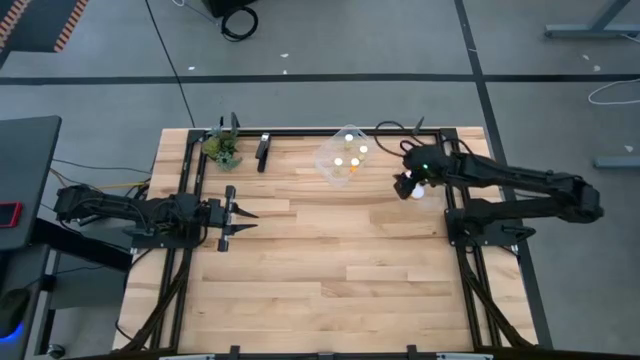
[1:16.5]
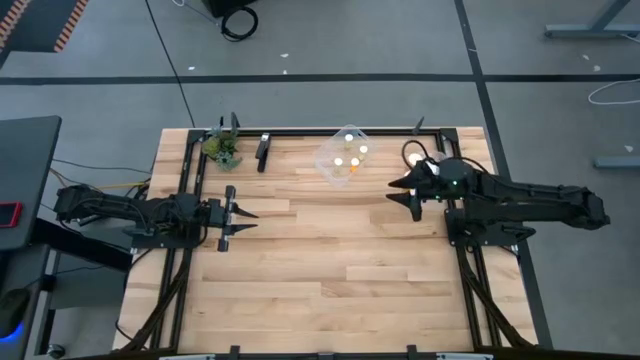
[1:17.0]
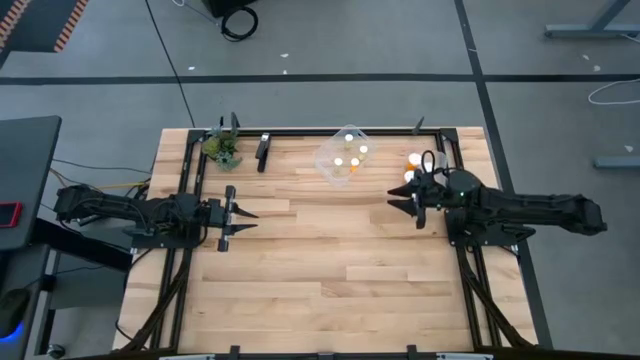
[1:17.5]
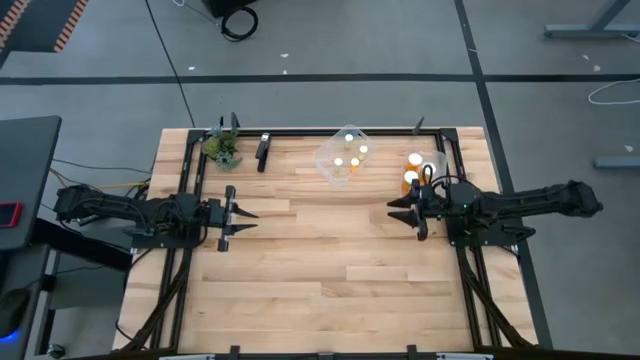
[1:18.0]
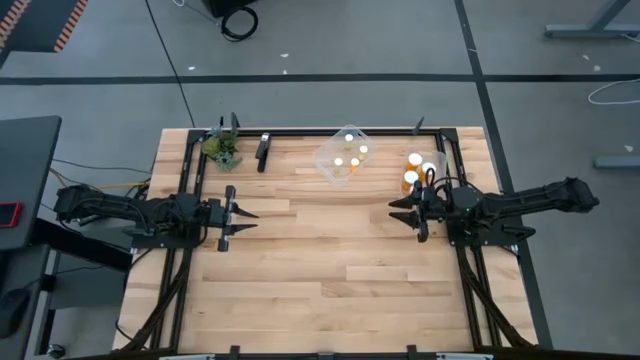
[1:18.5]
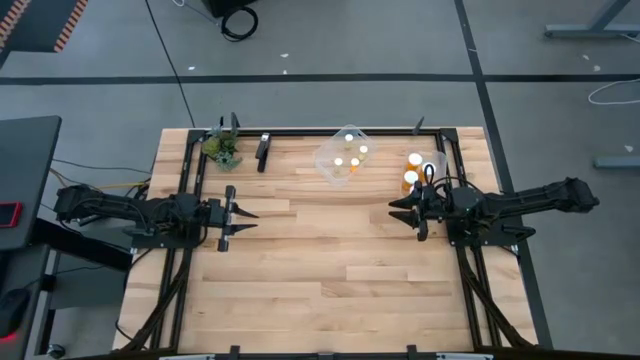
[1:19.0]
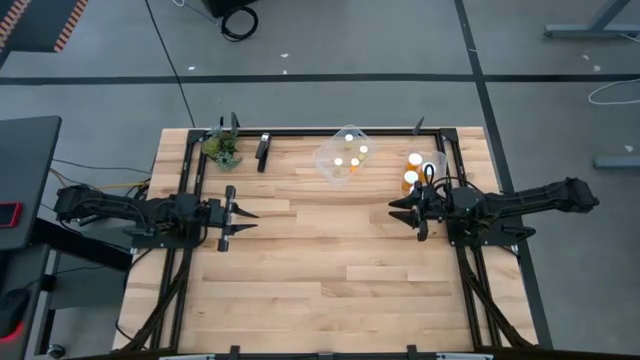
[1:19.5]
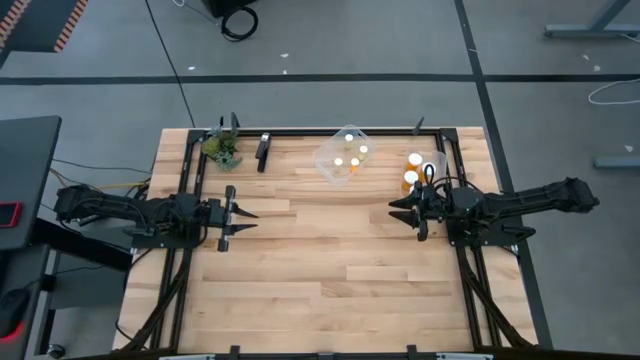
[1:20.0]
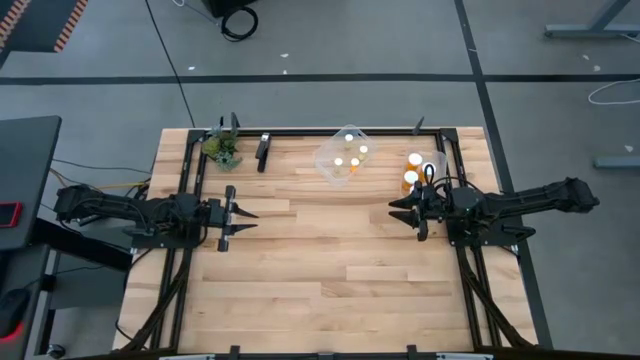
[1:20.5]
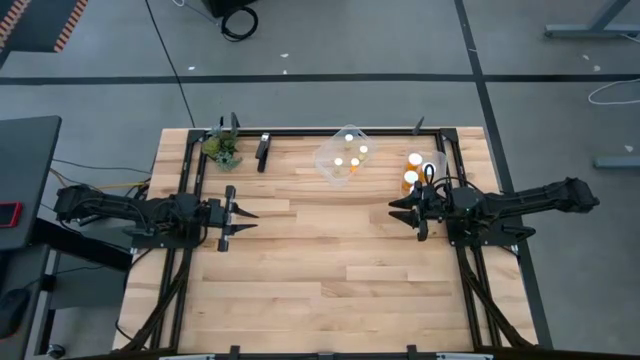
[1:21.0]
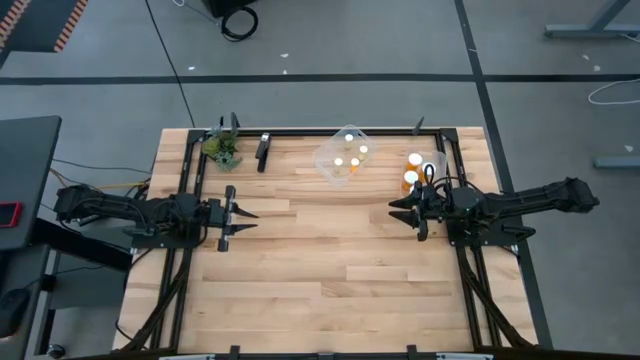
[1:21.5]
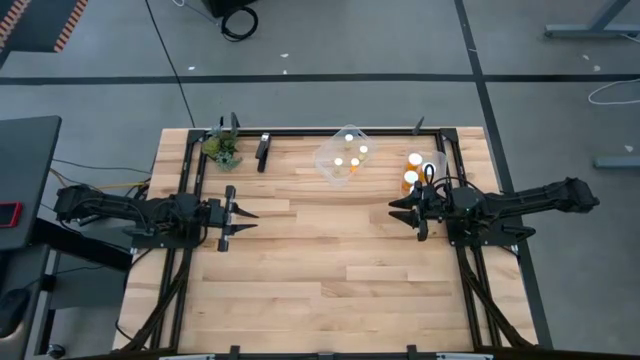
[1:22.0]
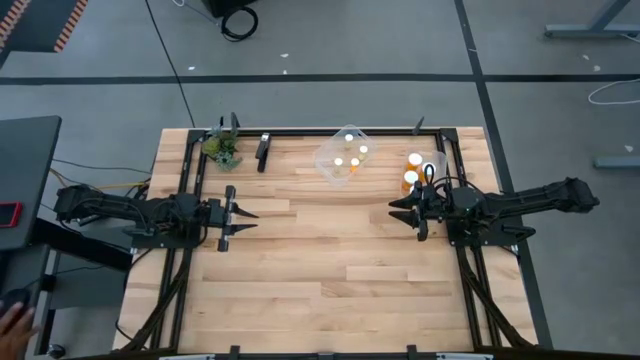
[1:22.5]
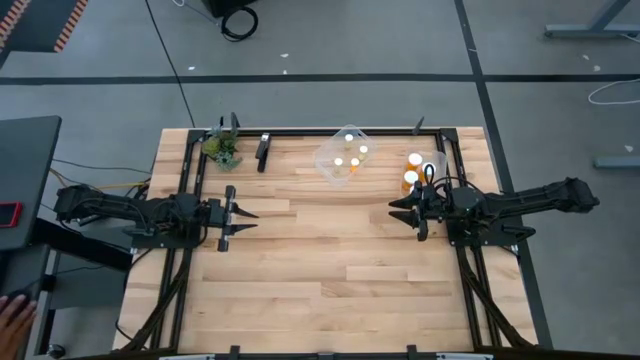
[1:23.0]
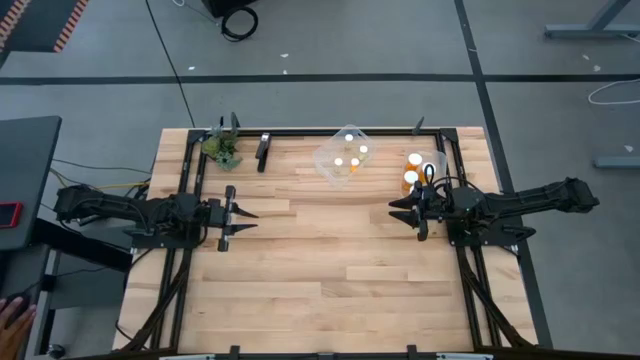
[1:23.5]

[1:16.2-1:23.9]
Task: Pick and place medicine bottles into bin by pill shape (circle, oval)
Return to Home Position

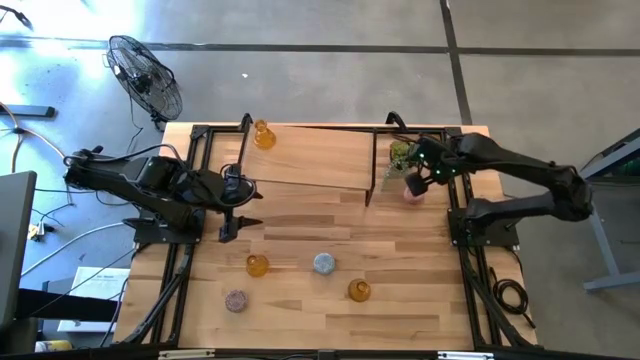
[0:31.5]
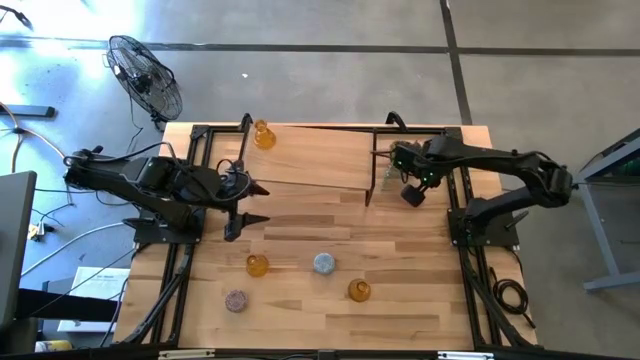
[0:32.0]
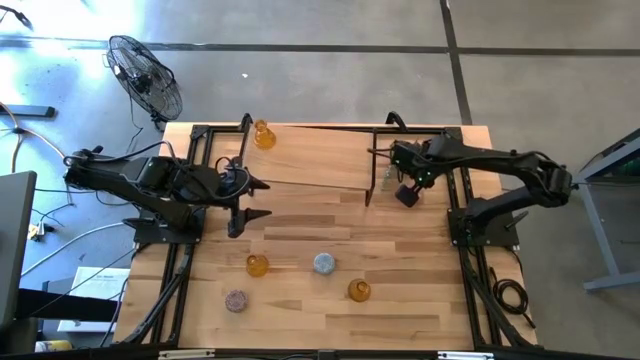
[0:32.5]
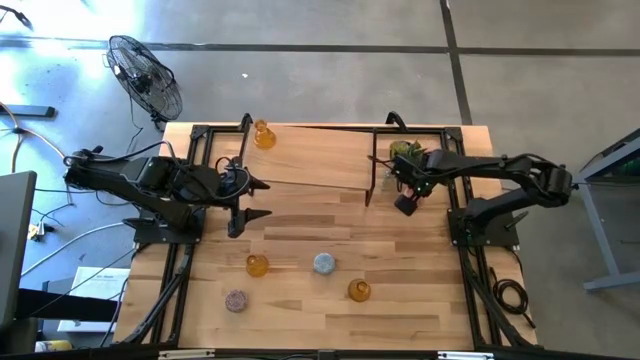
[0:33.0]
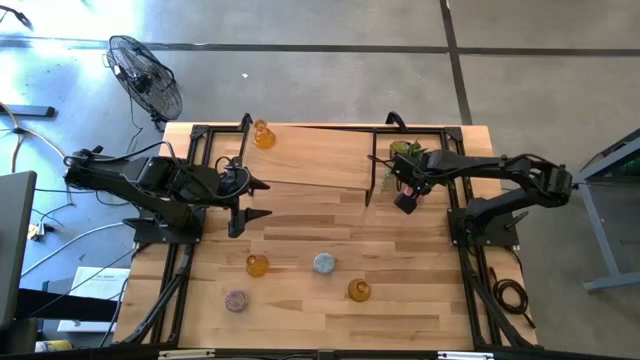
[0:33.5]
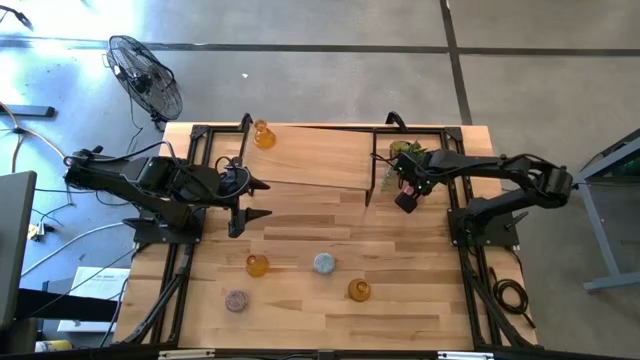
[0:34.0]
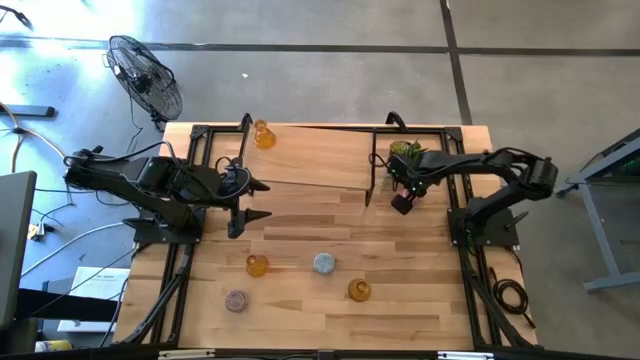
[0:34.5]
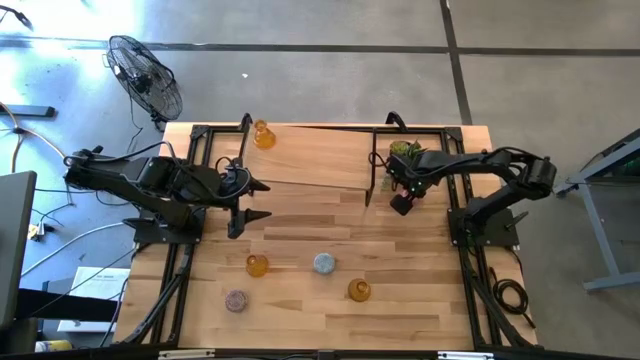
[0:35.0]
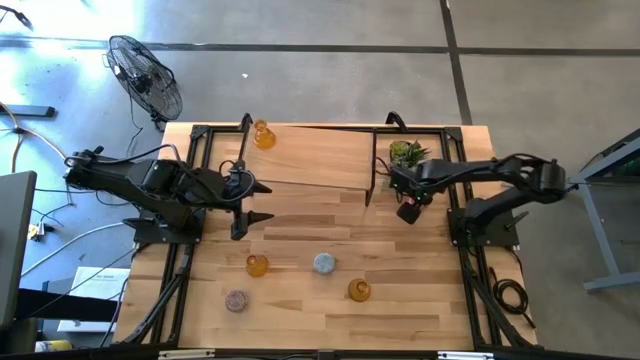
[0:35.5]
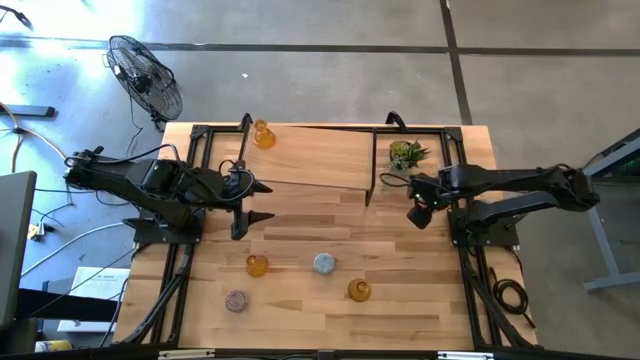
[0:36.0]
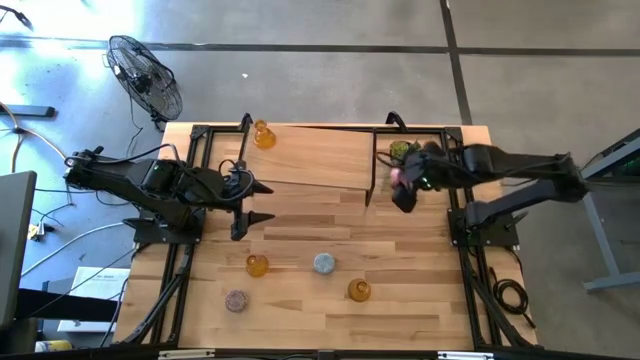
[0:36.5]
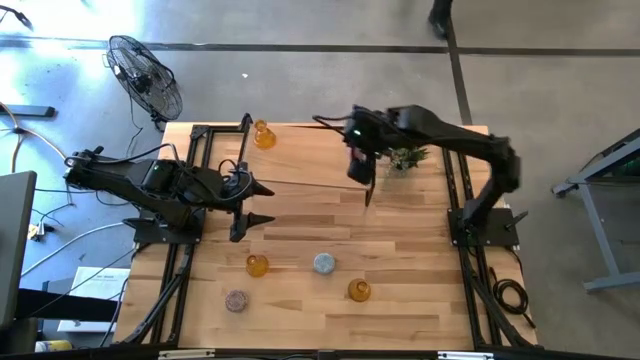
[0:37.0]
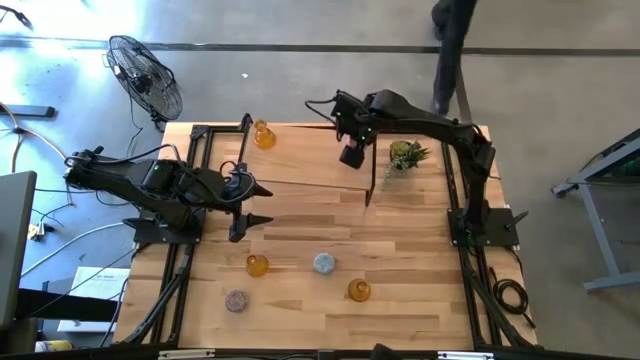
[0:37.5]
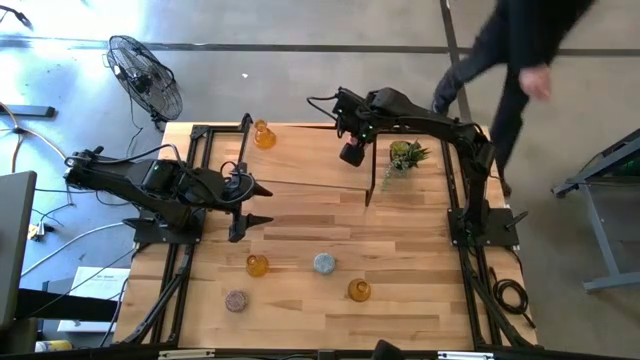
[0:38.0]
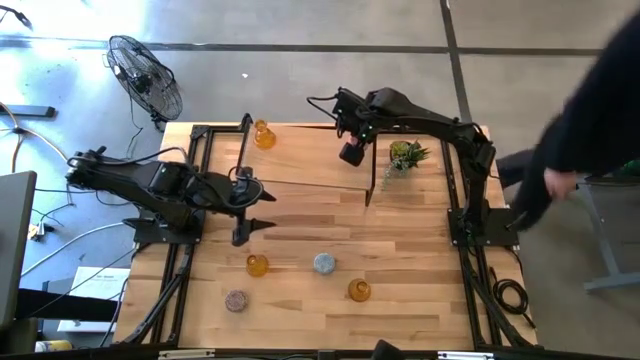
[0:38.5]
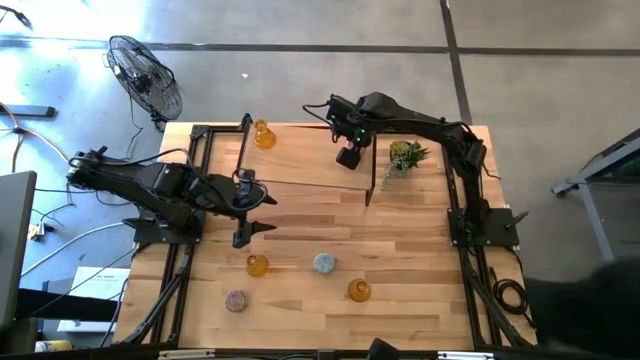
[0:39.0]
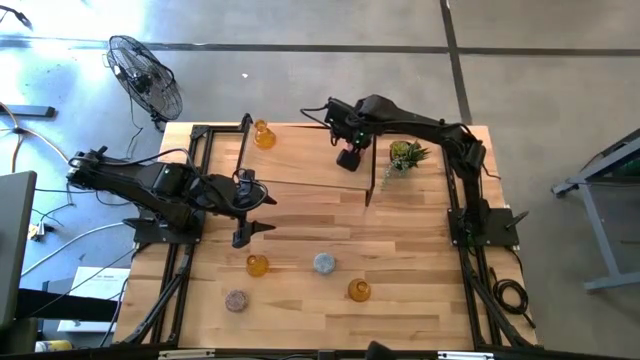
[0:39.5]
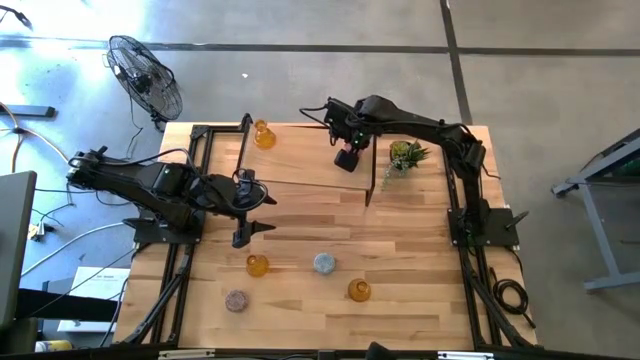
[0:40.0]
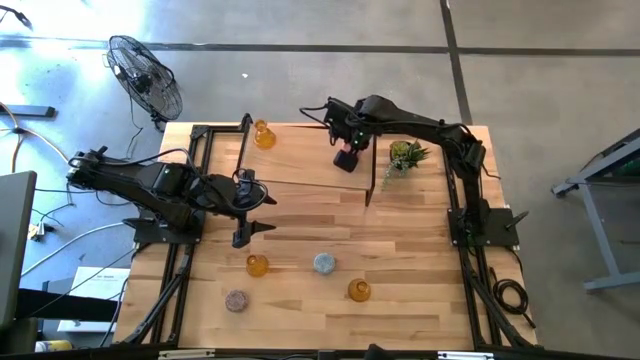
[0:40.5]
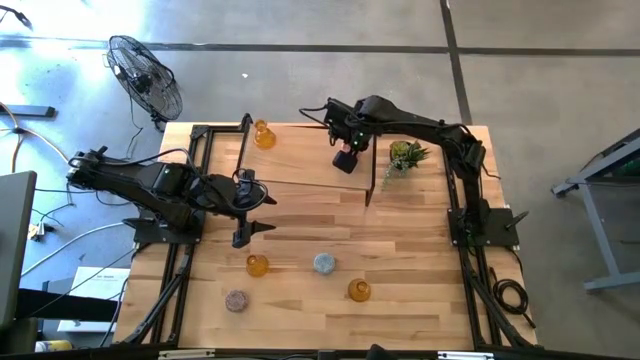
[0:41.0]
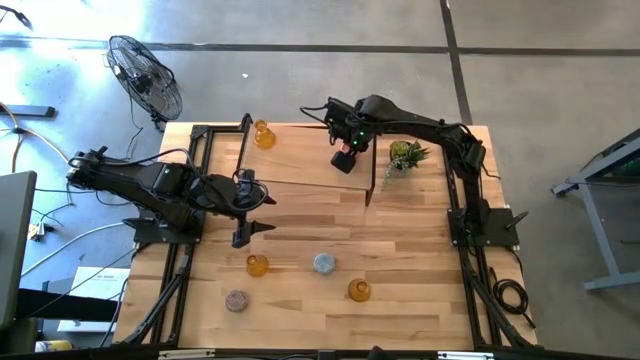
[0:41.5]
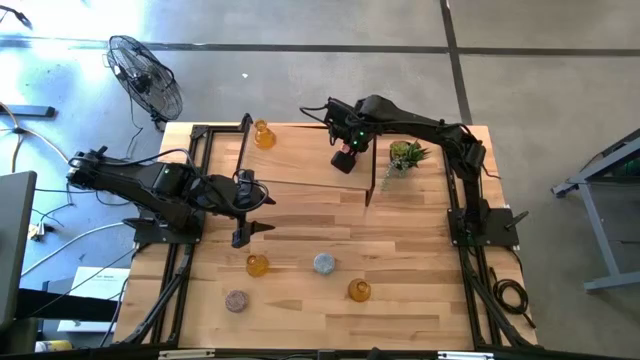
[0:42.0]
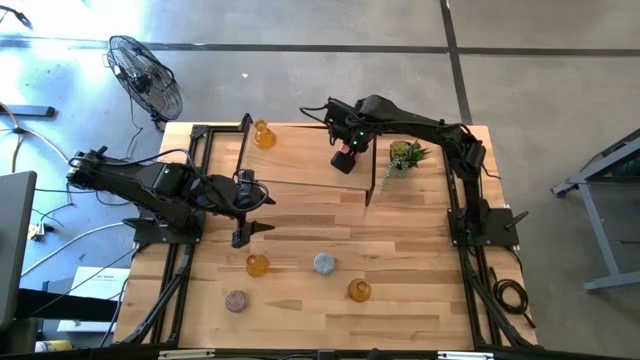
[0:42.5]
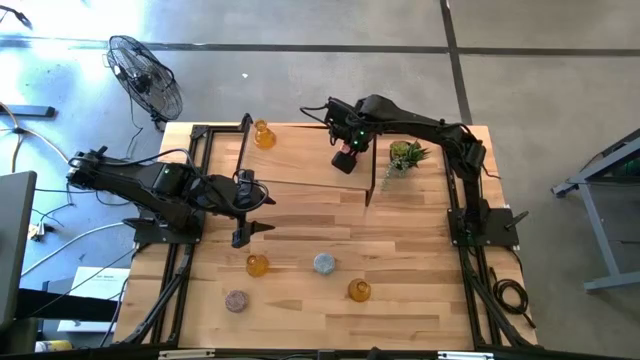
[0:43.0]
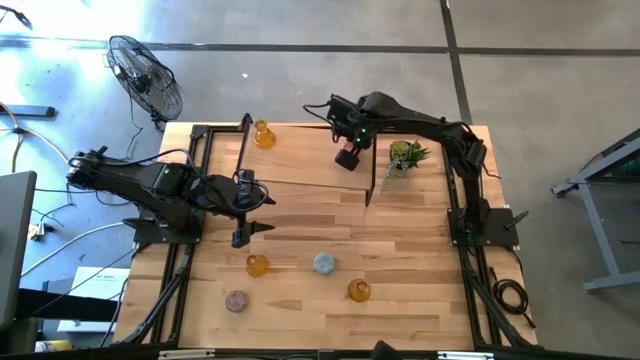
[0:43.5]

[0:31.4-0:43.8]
Task: Pick & Place candle stick holders
Put the pink scented candle on the shelf

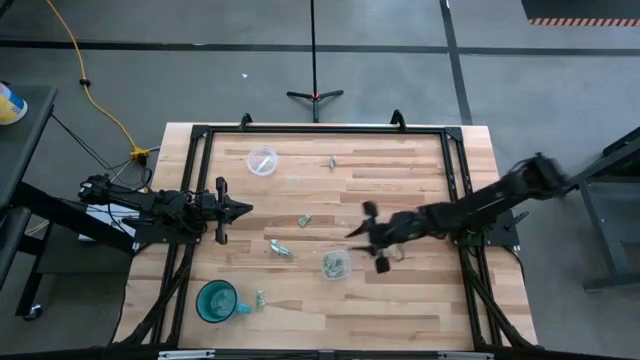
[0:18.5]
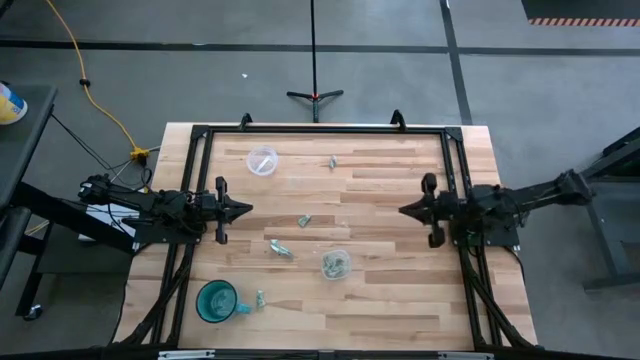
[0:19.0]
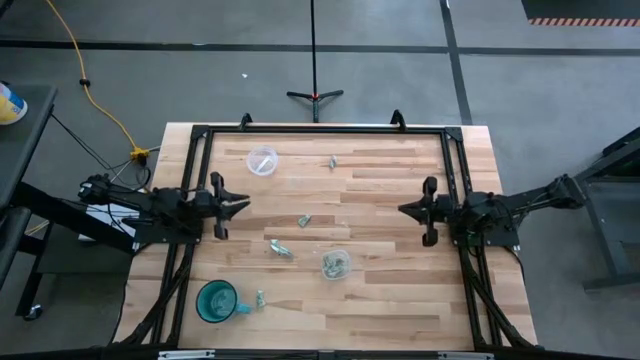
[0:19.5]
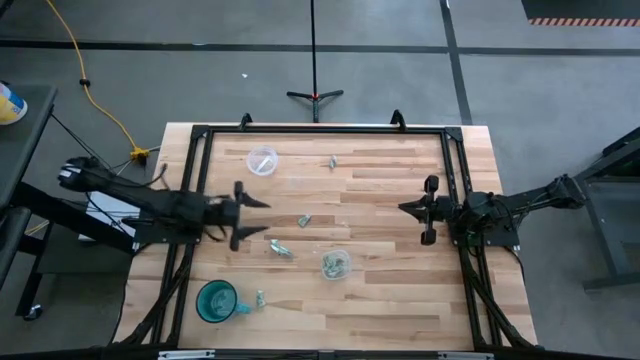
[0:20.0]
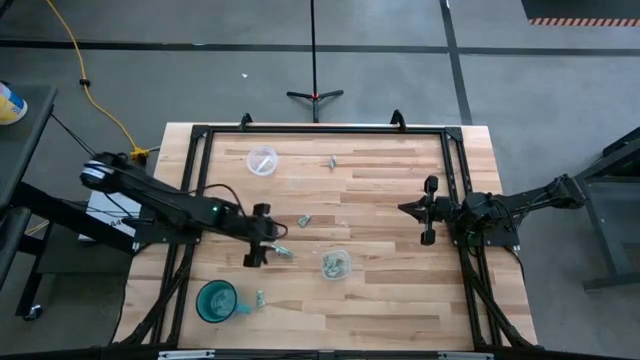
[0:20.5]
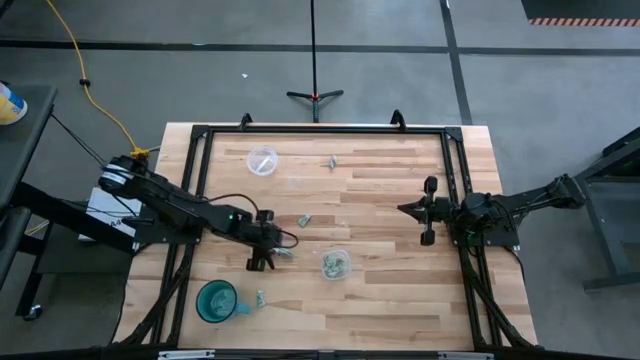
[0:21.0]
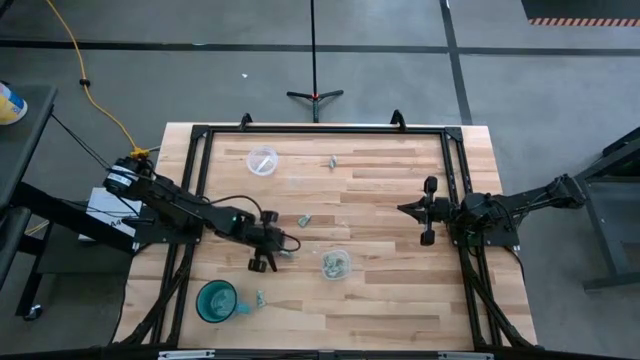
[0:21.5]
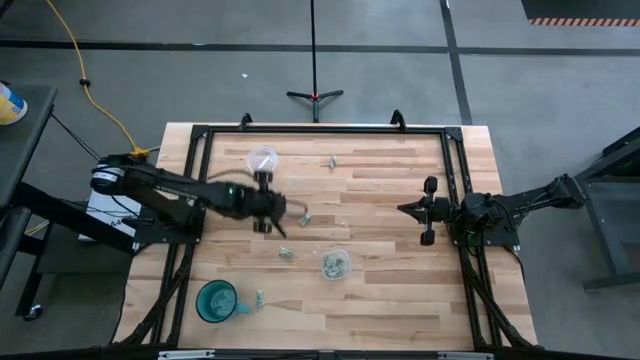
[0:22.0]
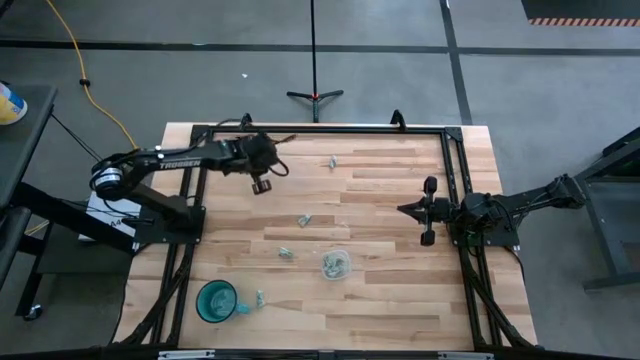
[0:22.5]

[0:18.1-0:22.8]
Task: Pick and place Stevia / Truvia into bins
Put the stevia packet into the top transparent container
